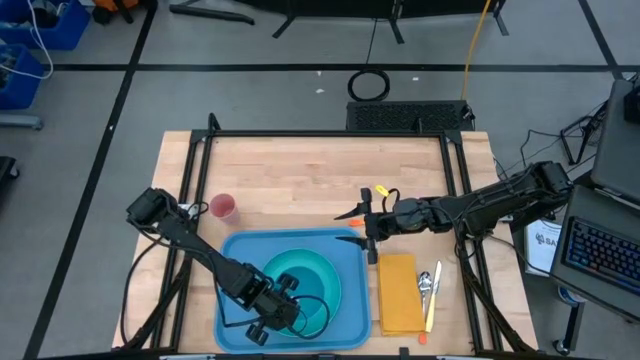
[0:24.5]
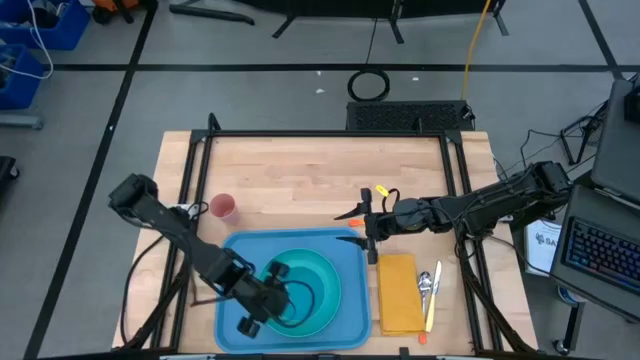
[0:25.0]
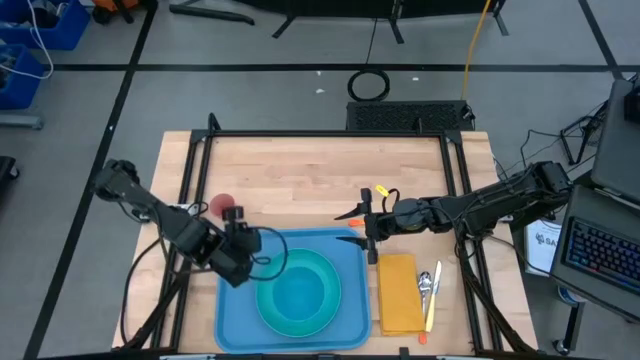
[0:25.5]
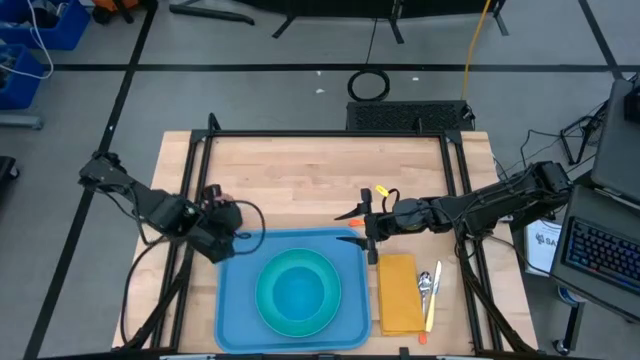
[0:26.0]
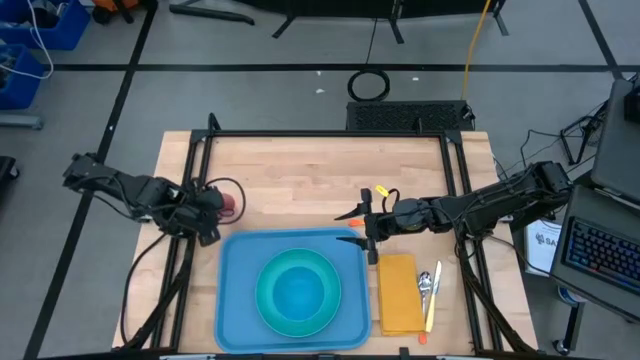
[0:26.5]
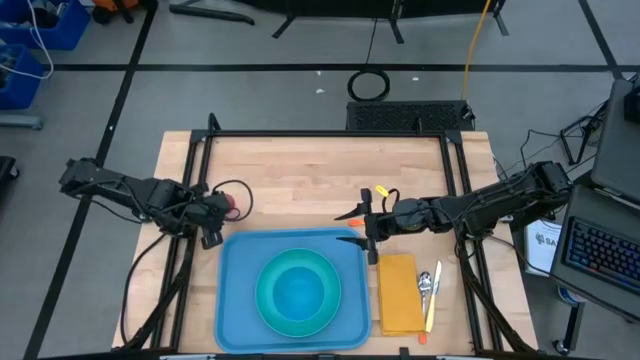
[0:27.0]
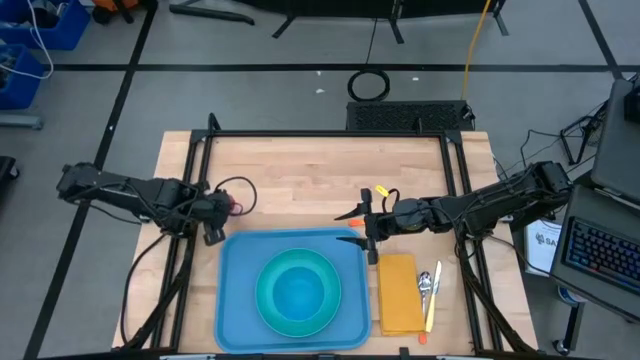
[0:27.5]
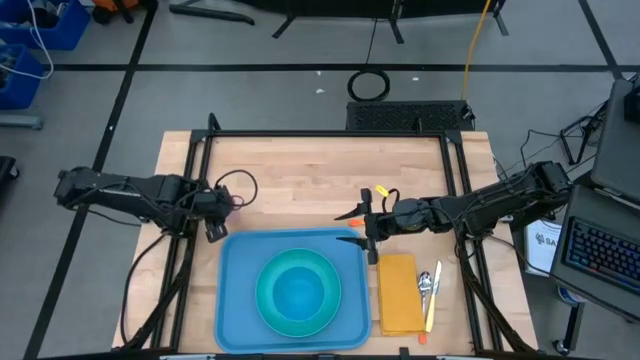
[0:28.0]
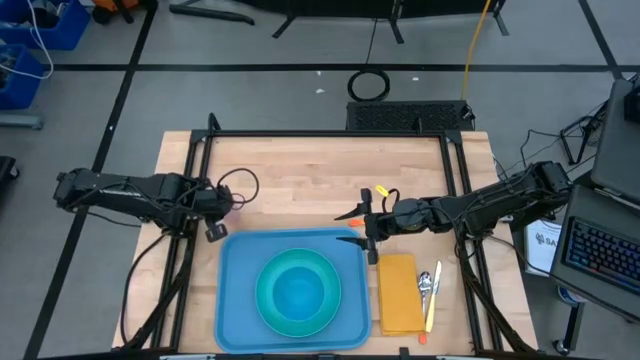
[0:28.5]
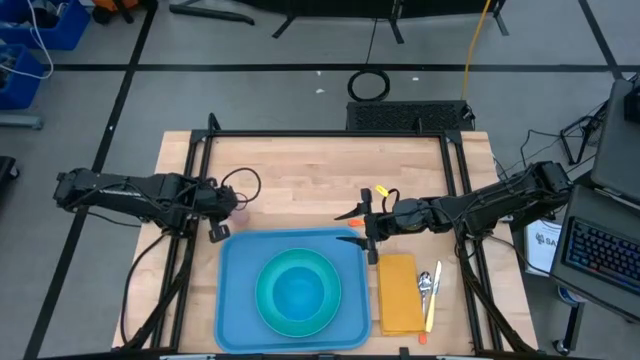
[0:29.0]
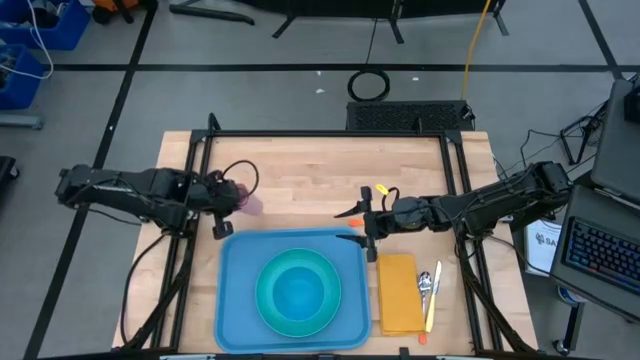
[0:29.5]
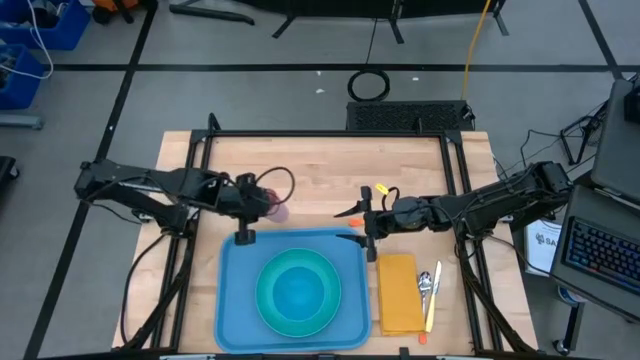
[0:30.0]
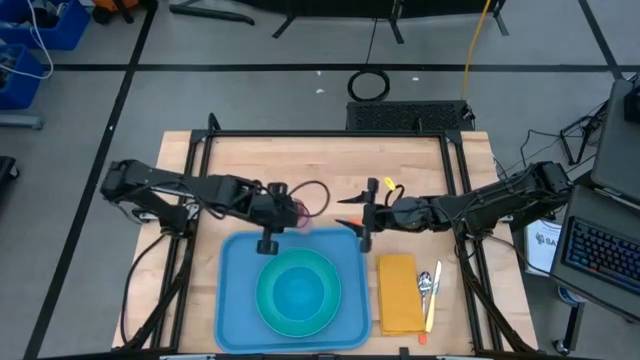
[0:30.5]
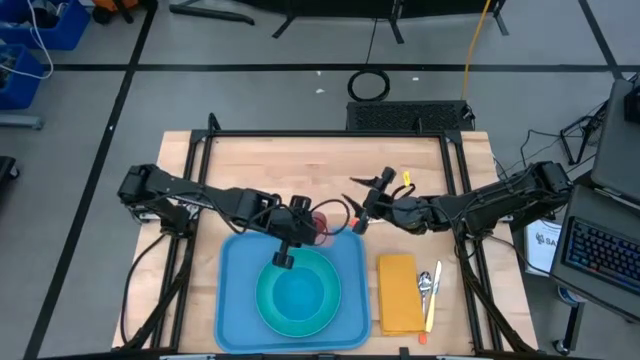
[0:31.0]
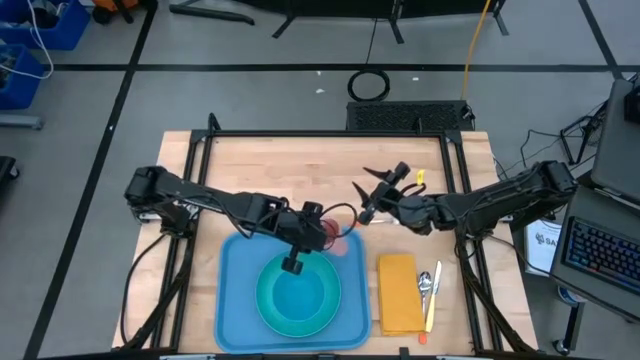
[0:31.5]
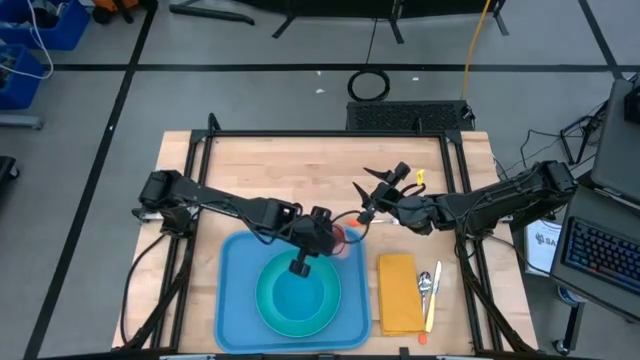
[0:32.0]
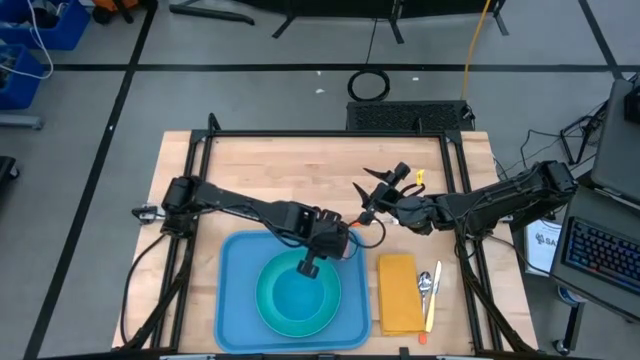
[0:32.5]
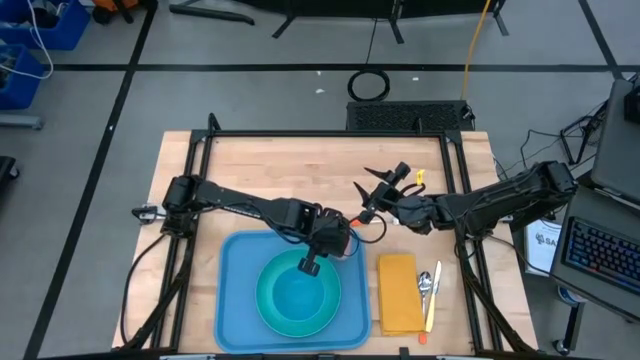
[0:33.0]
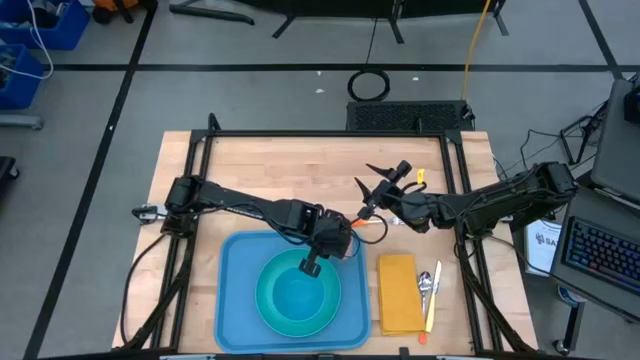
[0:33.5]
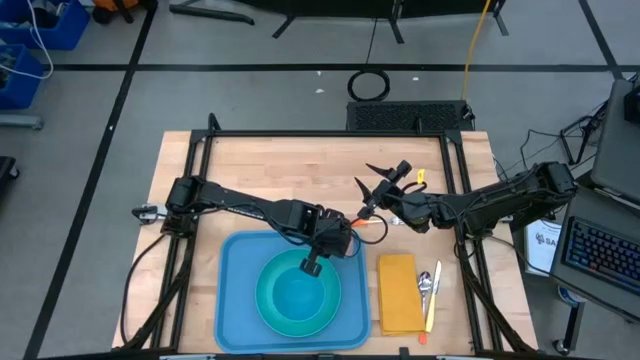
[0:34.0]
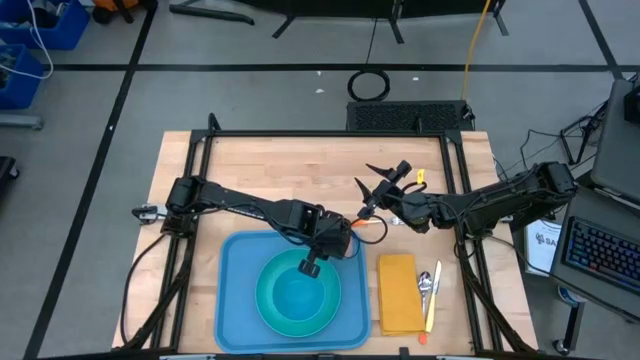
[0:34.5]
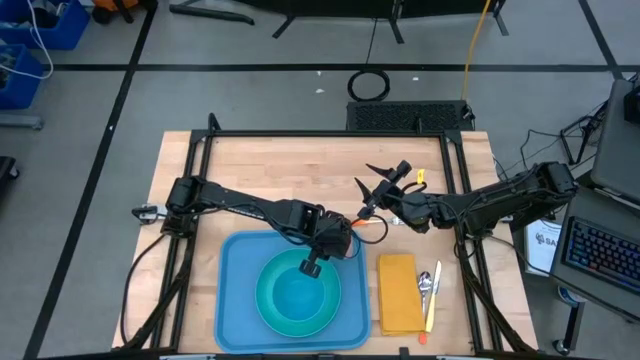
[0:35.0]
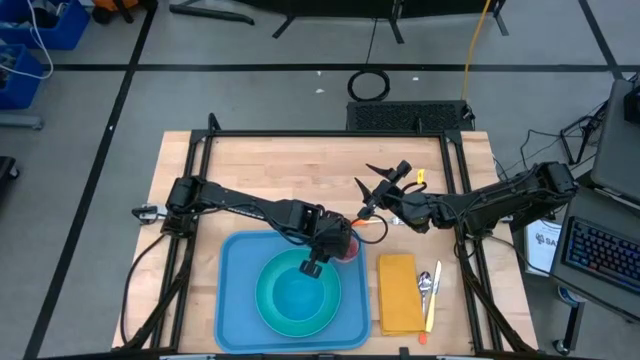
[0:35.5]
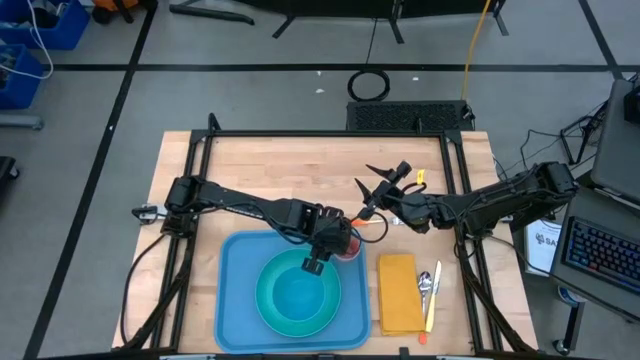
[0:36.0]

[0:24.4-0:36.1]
Task: Set up tray
Put the pink cup on the serving tray to the top right of the light blue plate

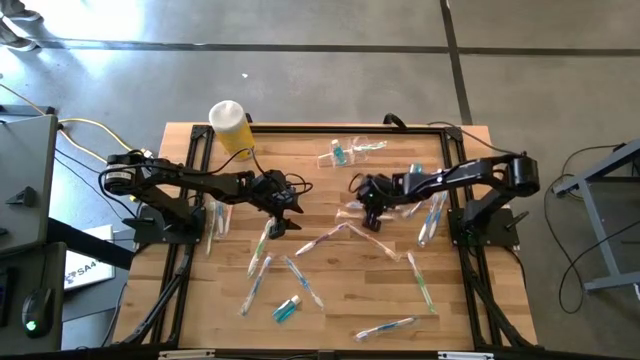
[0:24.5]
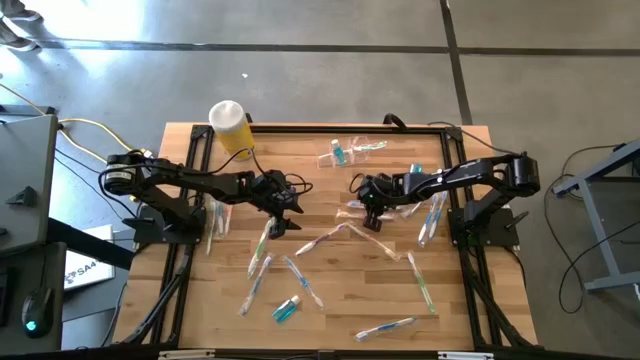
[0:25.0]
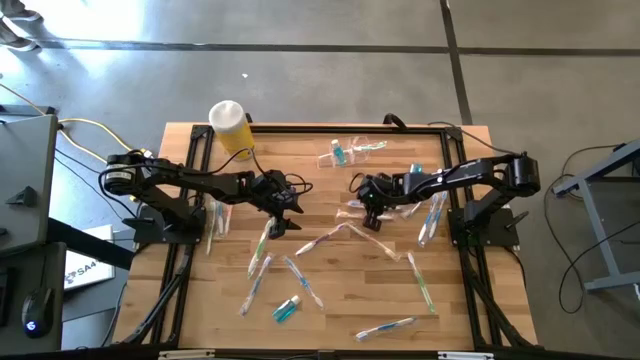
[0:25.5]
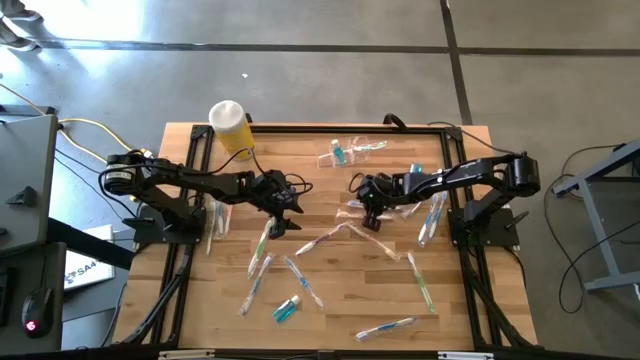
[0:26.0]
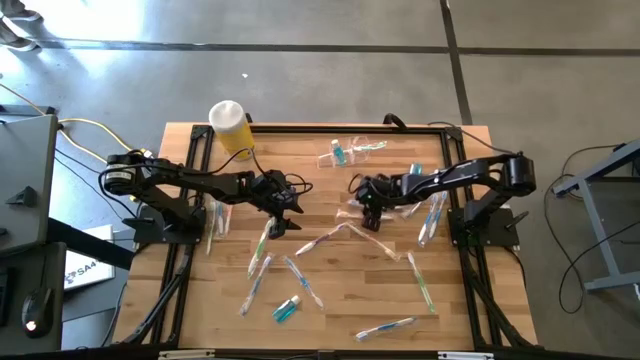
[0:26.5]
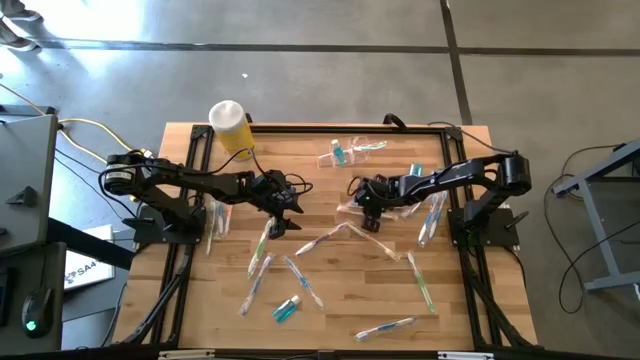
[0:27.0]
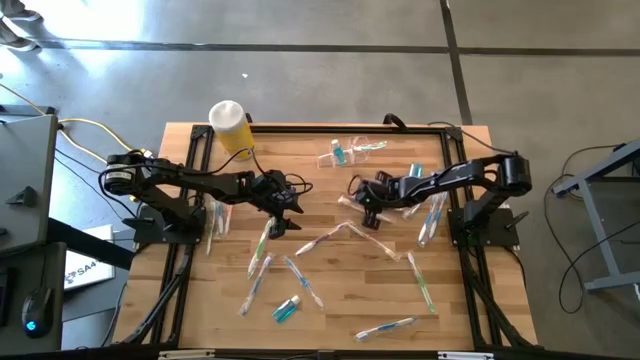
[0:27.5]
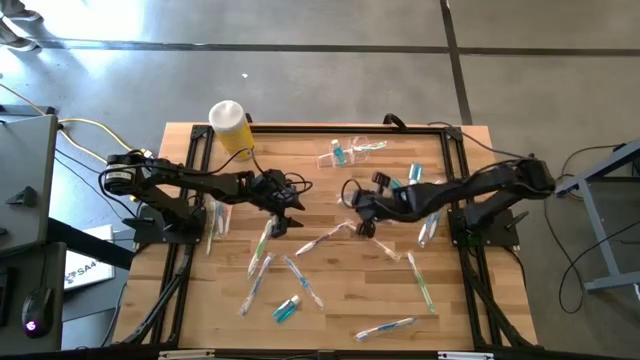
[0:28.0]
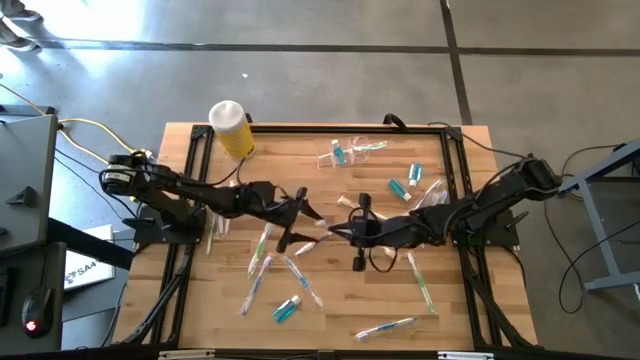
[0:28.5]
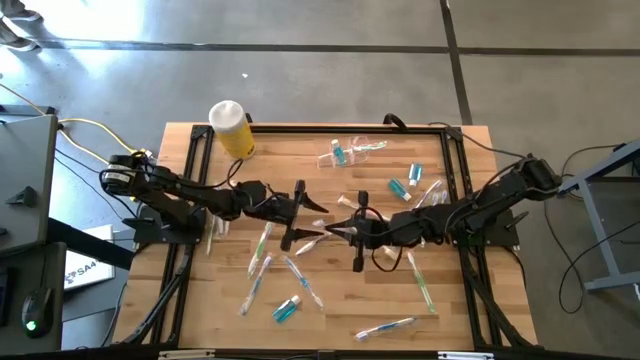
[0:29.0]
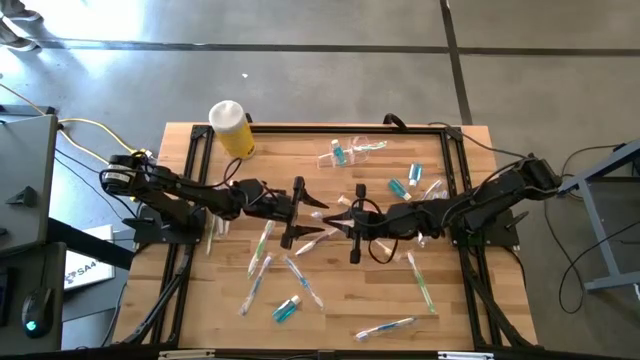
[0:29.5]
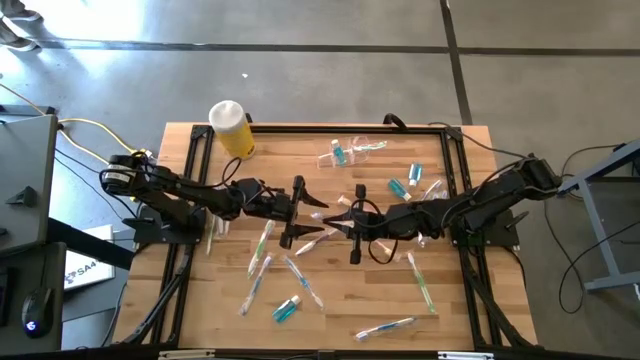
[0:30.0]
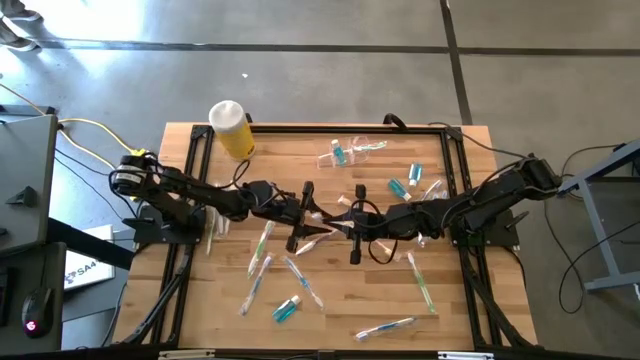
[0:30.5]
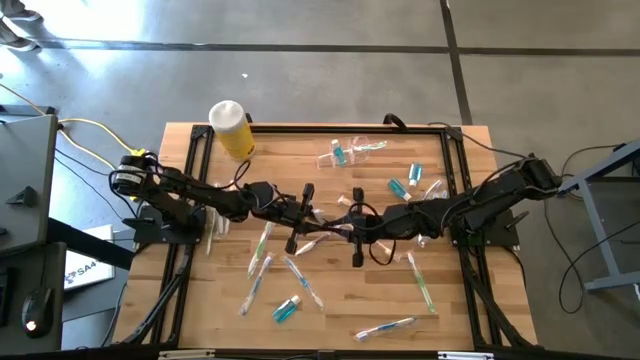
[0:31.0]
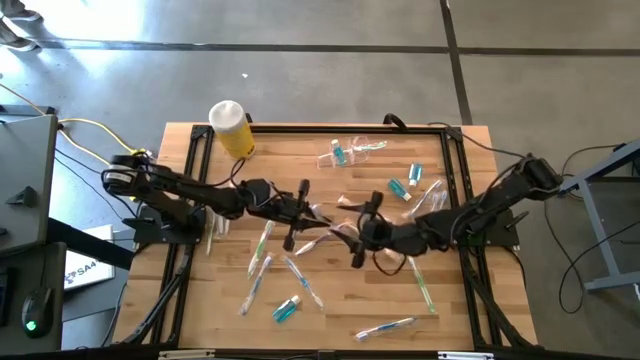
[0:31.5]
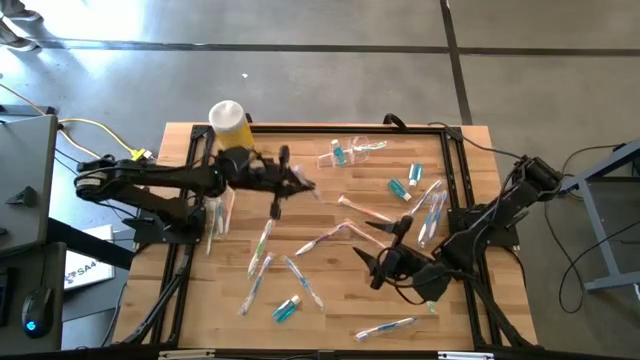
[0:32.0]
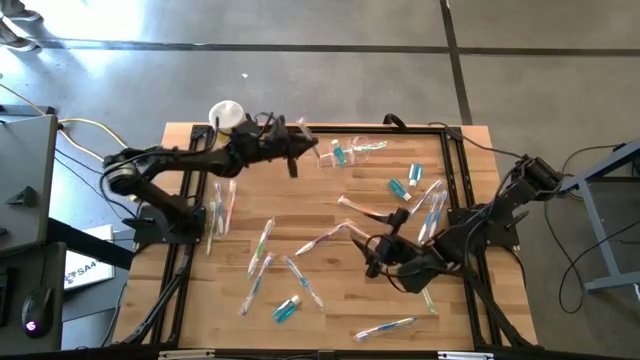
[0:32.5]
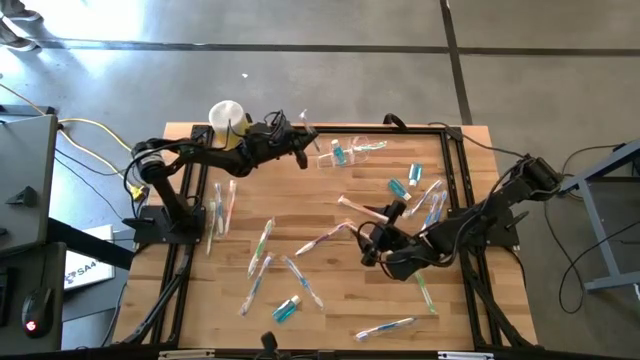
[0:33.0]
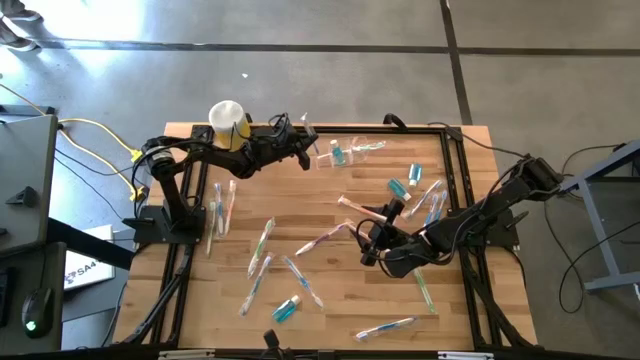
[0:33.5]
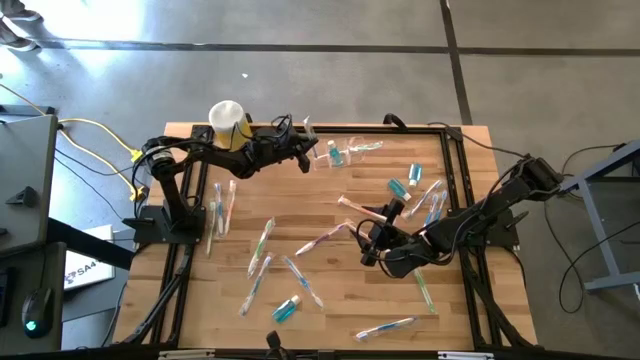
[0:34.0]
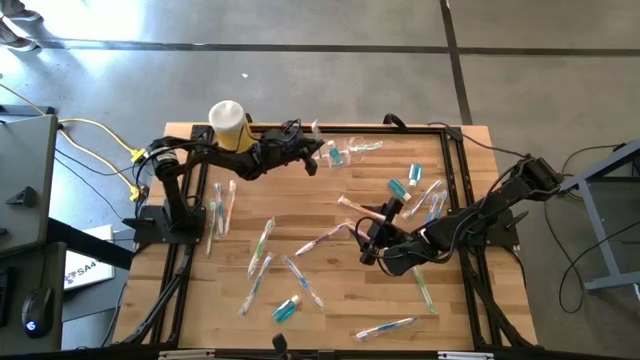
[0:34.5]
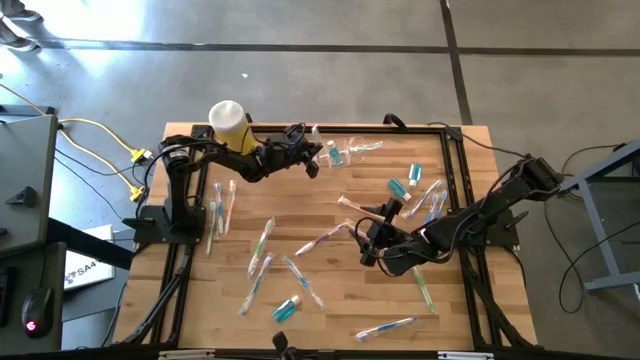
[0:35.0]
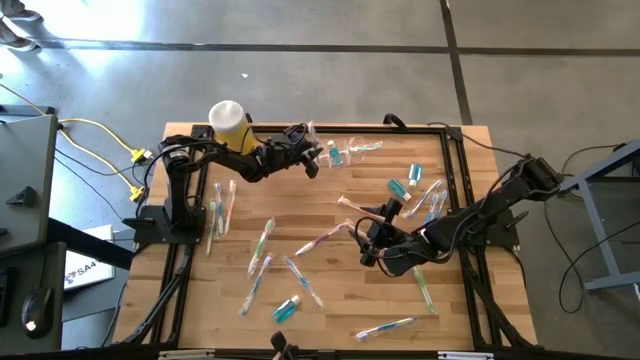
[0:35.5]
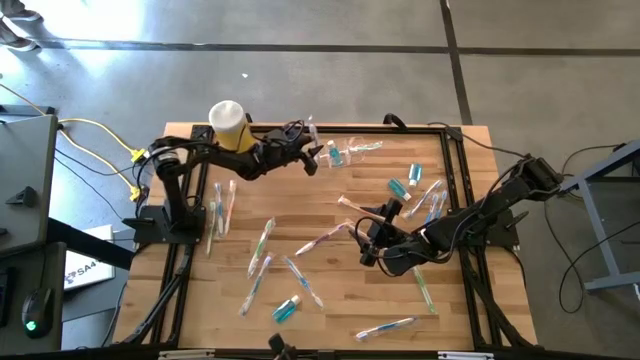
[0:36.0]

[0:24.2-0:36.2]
Task: Pick & Place toothbrushing station
Put the blue toothbrush into the transparent organizer
